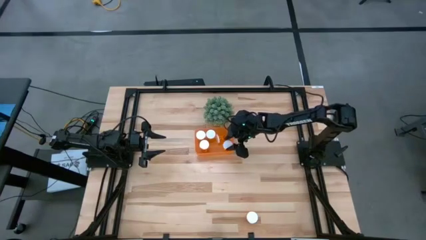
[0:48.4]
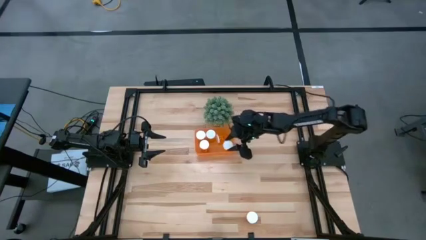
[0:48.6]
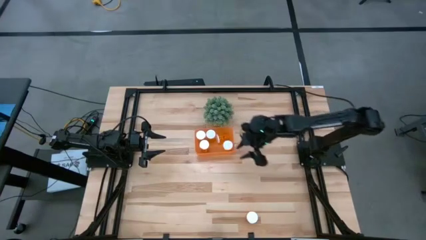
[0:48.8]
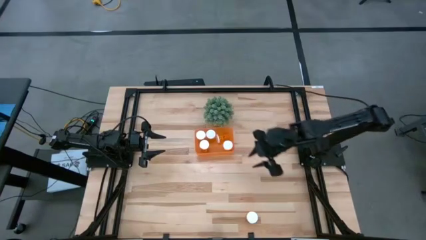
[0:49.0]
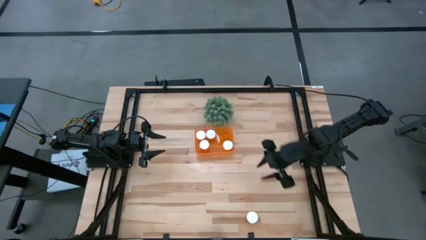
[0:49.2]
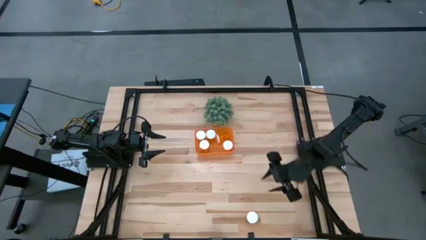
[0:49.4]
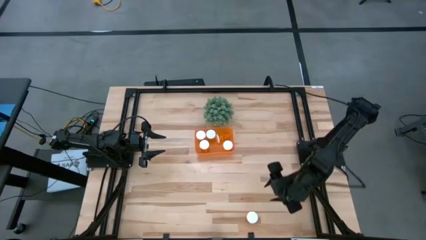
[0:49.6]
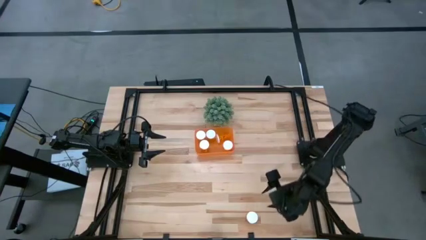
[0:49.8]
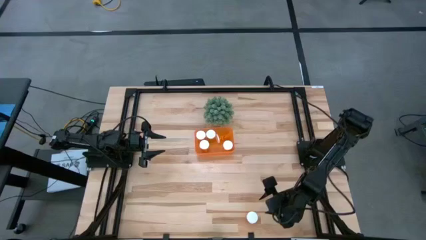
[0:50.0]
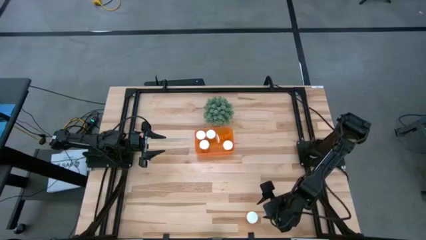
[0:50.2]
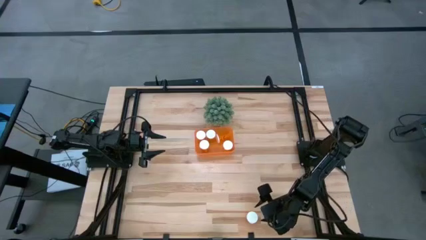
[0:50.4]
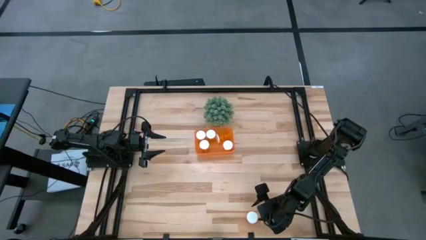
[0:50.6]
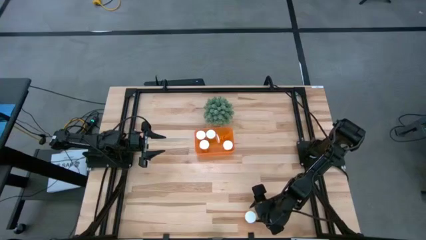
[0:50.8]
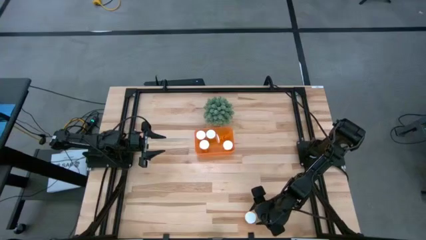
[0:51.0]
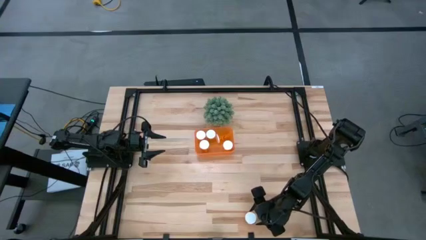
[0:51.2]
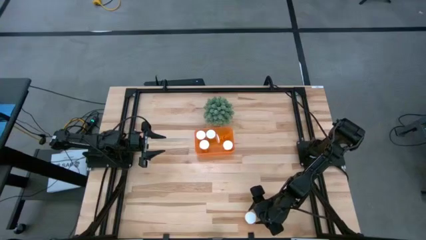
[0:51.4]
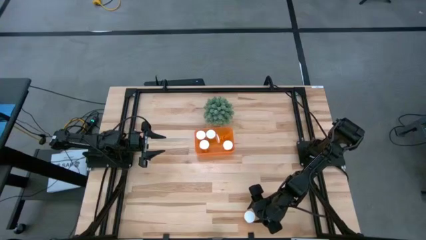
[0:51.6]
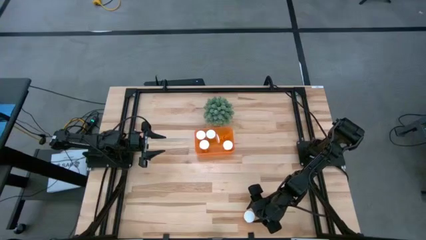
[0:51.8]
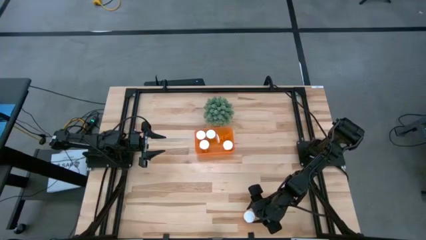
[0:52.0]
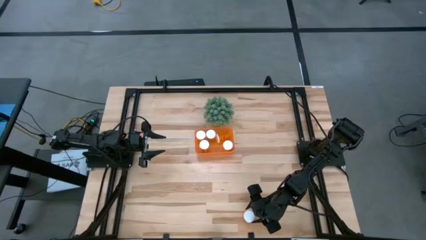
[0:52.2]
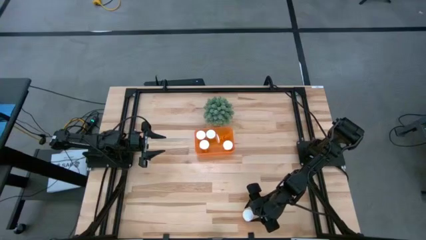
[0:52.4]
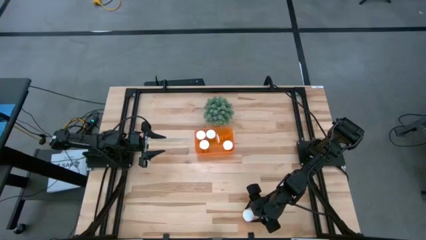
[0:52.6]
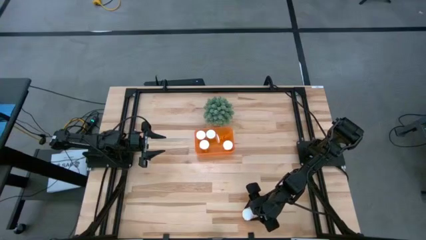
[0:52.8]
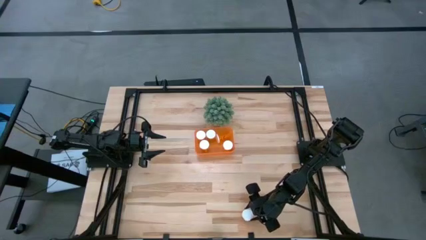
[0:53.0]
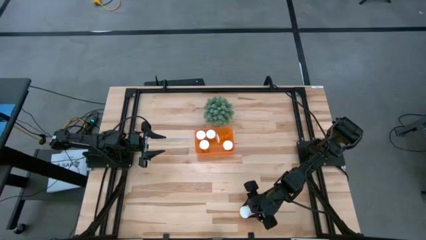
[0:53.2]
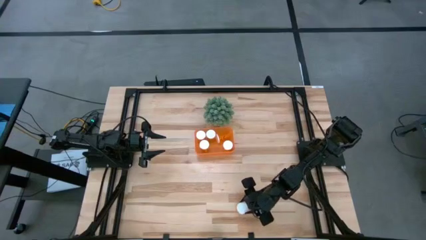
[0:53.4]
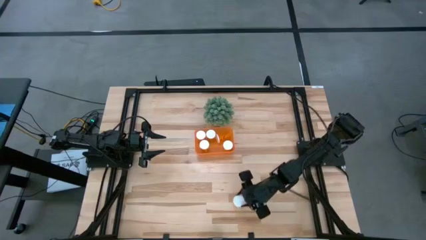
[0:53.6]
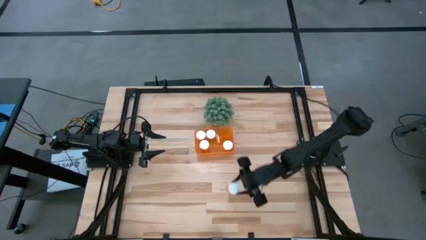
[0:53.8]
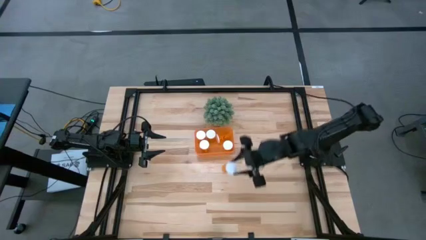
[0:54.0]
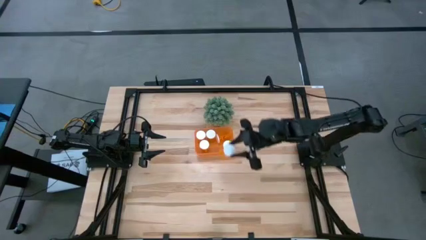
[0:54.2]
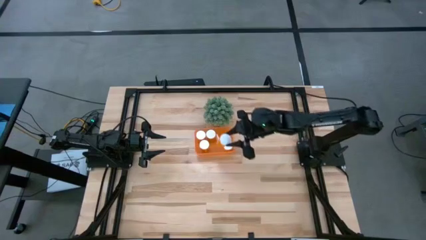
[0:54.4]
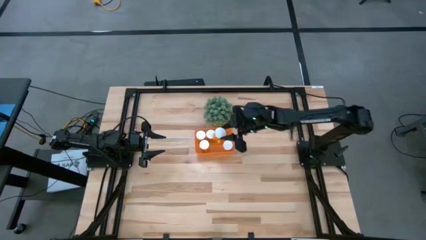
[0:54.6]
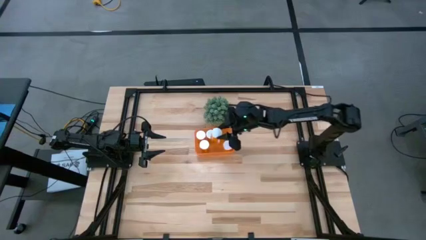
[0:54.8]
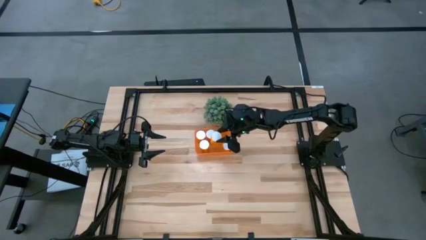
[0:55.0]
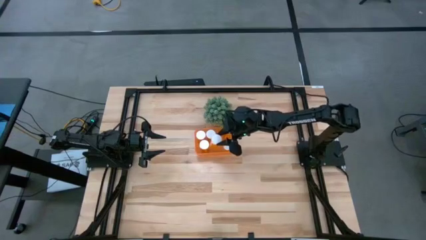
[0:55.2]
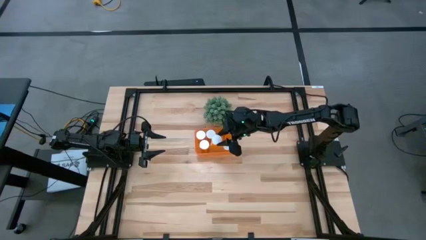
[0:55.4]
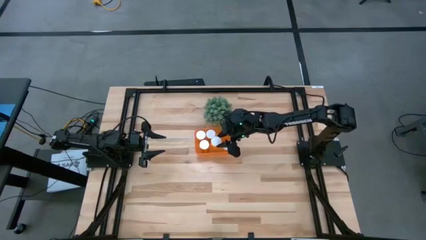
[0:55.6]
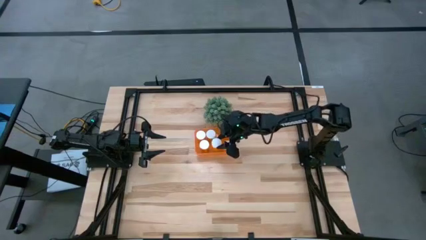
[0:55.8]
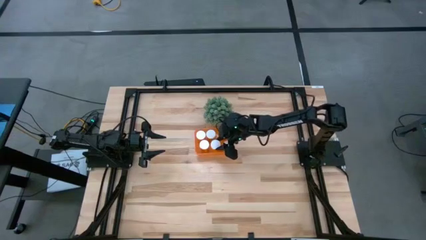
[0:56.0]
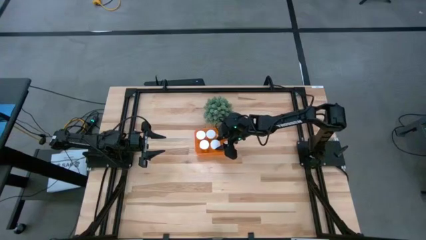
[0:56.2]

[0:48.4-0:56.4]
Task: Pick and place pill bottles into a basket
Put the orange pill bottle into the orange bin

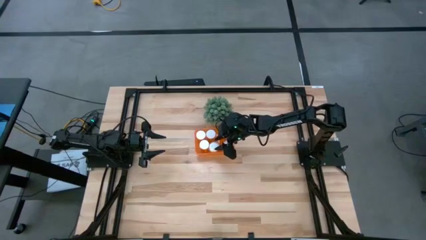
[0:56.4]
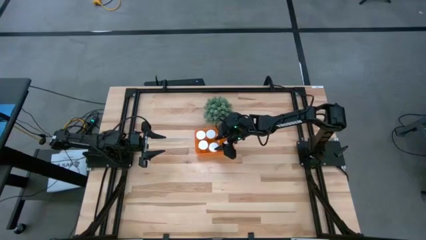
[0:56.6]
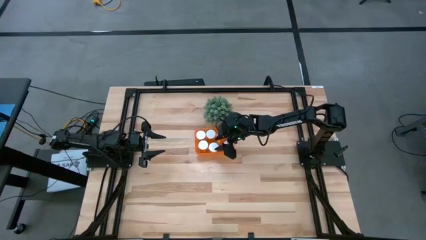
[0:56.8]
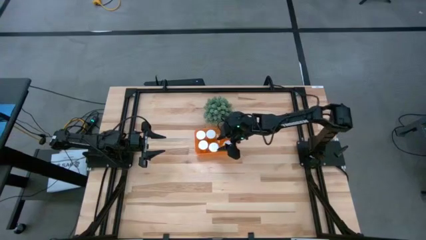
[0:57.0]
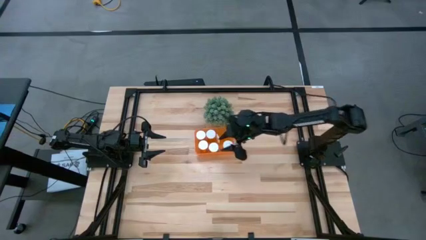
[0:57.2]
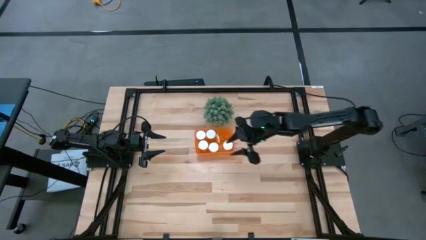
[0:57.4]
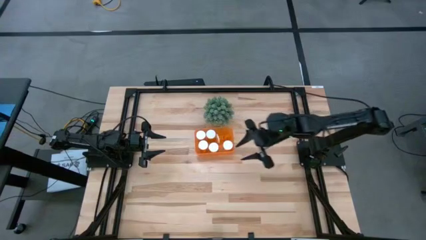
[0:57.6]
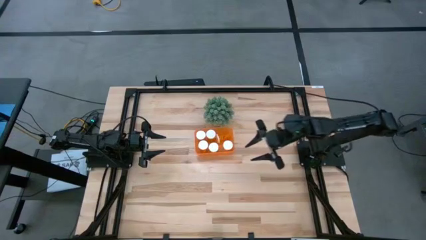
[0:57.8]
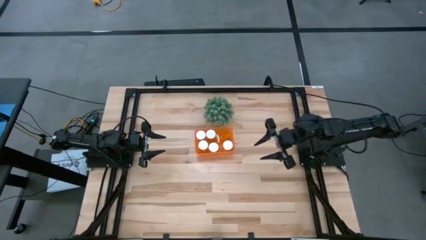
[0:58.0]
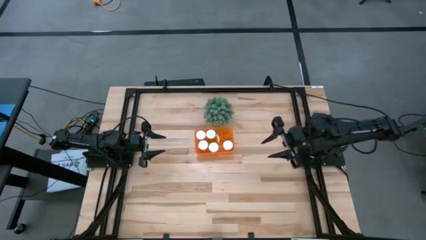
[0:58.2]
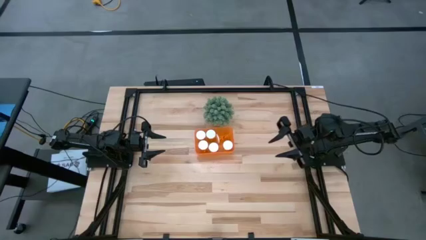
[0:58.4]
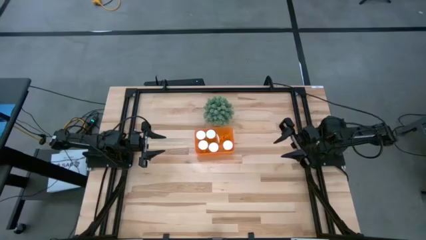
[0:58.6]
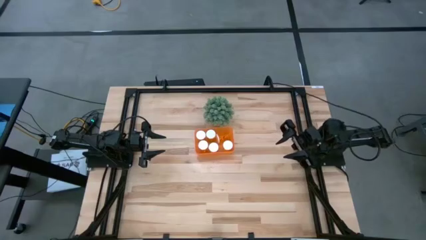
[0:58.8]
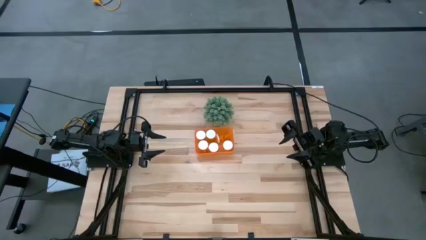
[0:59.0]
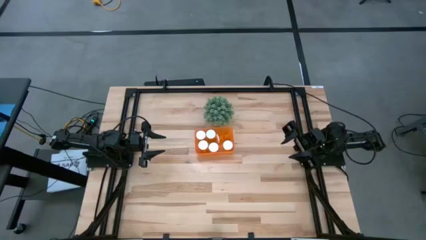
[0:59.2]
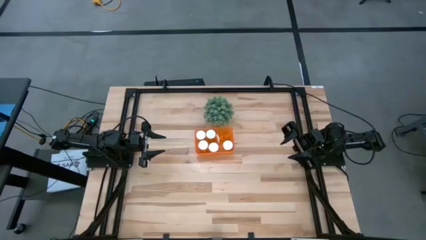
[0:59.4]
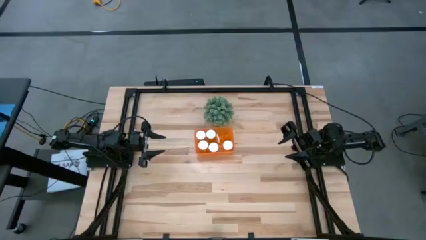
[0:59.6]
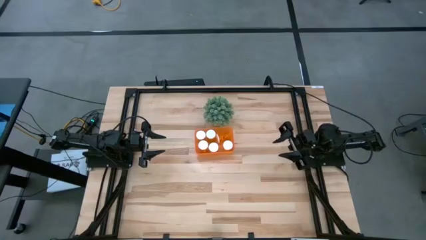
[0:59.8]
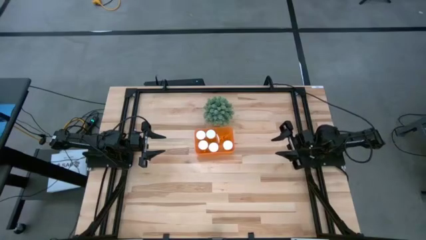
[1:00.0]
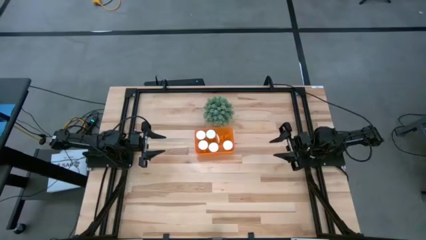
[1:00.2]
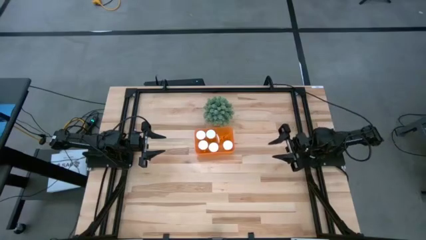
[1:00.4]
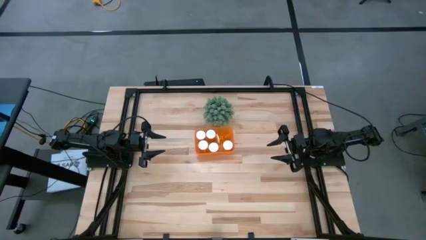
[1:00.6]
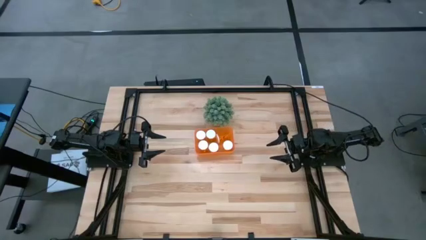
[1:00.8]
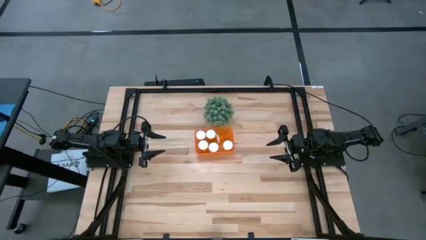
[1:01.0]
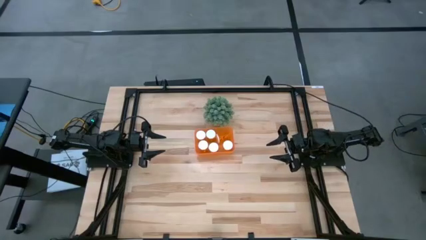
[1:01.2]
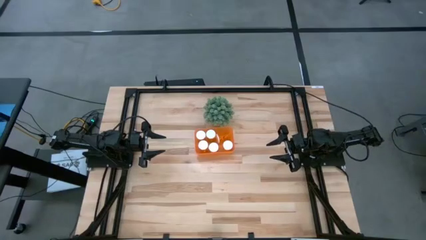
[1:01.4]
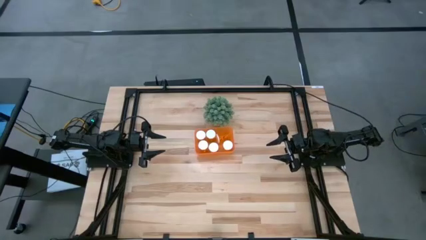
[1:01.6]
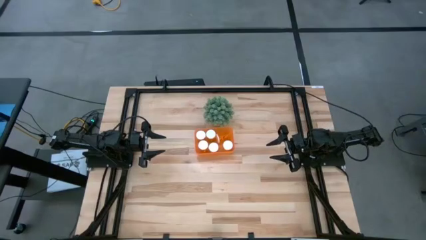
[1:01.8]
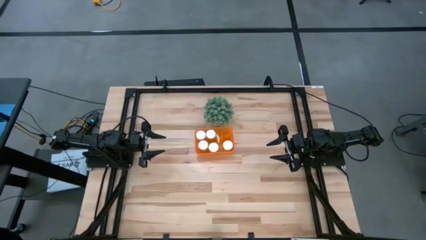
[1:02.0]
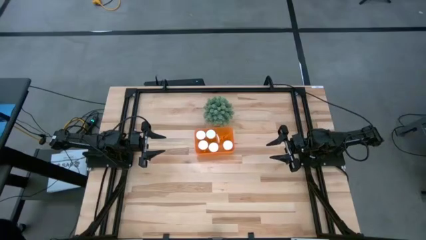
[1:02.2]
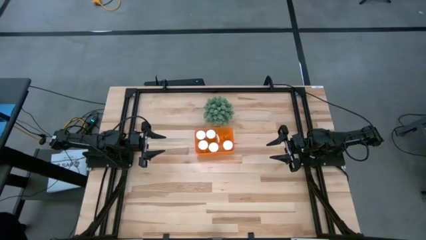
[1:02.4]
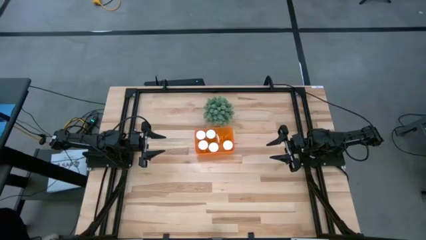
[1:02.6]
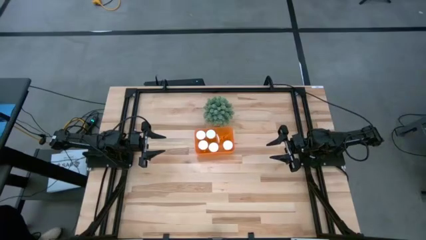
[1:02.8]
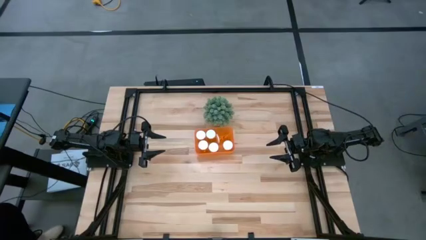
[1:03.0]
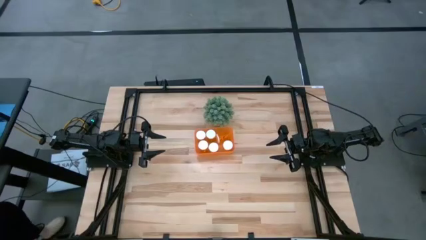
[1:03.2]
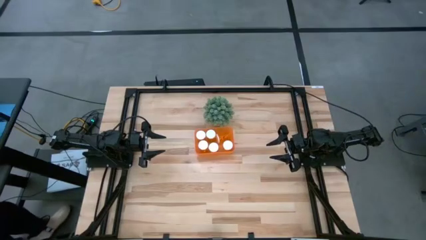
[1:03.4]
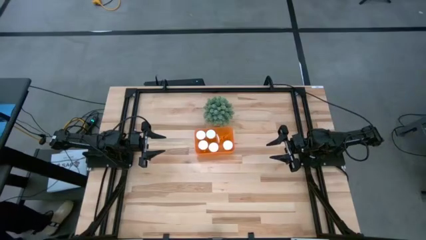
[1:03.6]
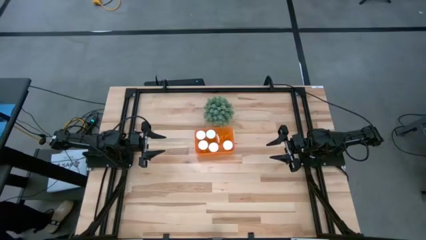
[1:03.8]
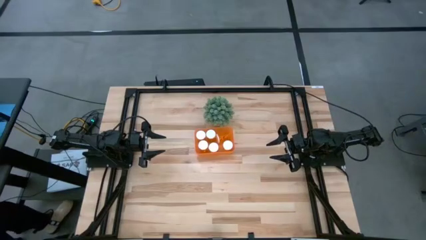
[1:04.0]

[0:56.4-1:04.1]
Return to Home Position

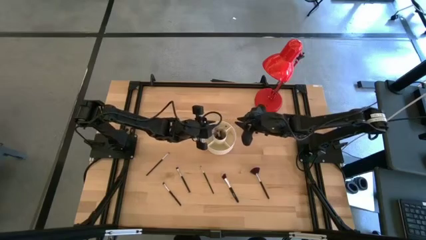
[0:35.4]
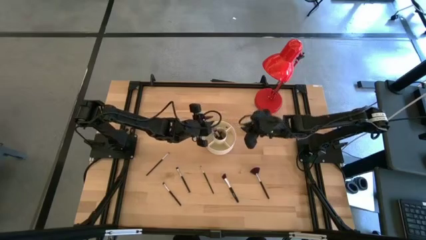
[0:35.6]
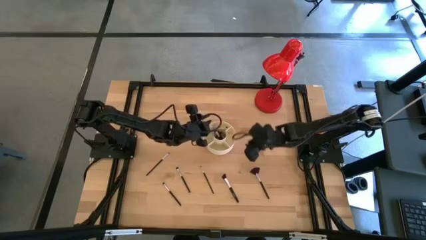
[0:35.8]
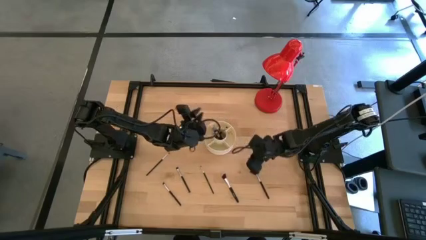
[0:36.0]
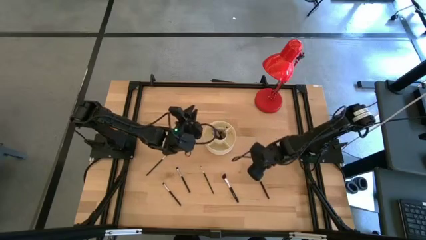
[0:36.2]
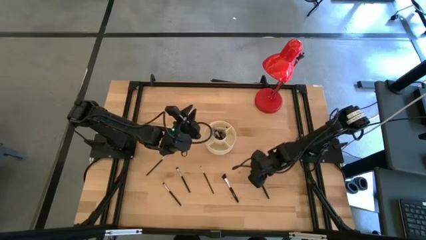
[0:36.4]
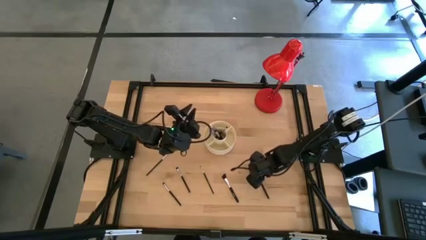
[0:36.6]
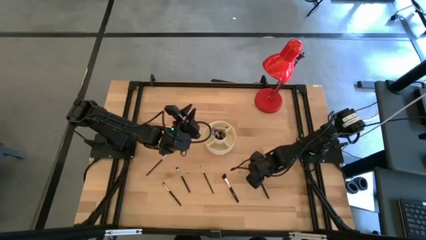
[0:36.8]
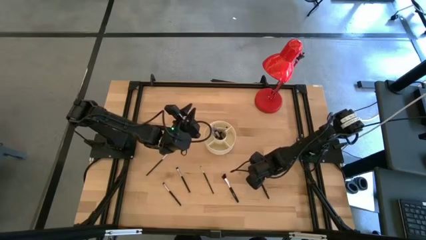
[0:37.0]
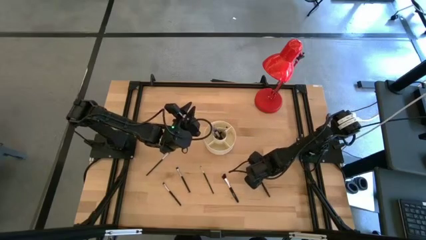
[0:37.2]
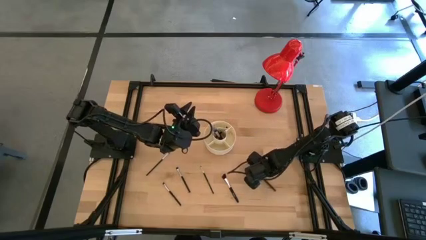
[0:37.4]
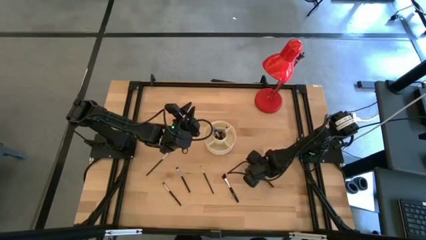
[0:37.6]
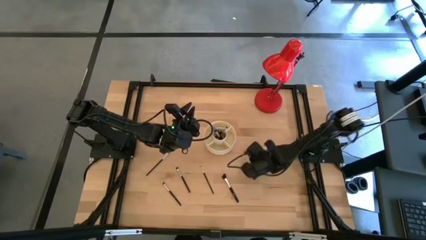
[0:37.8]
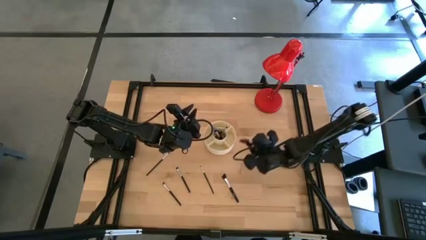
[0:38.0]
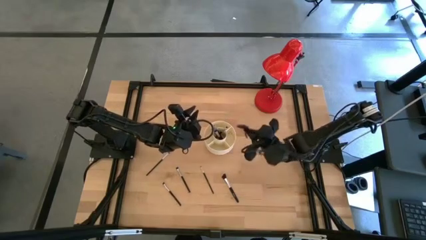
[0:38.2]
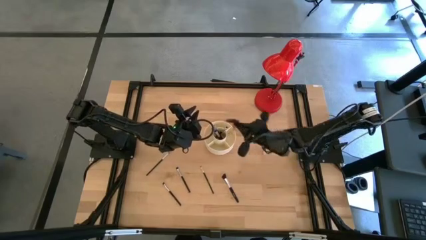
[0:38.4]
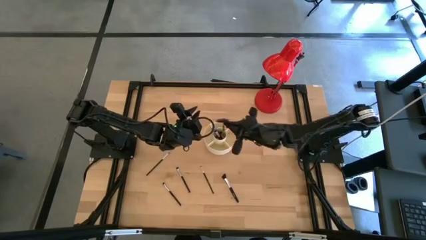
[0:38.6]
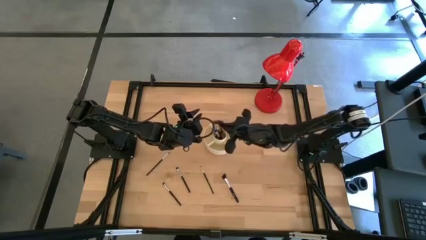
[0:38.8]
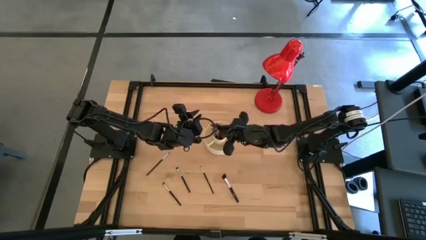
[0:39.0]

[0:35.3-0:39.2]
Task: Put items in baskets/containers
Put the highlighter brush into the brush organizer
